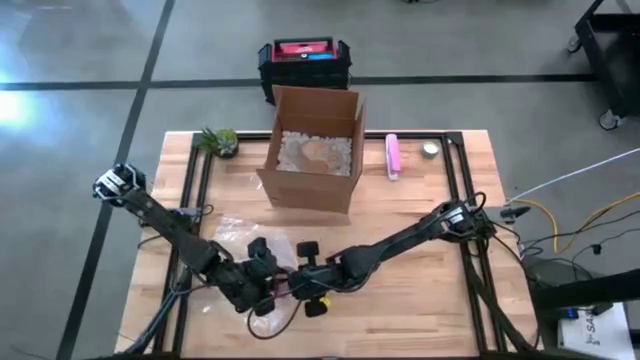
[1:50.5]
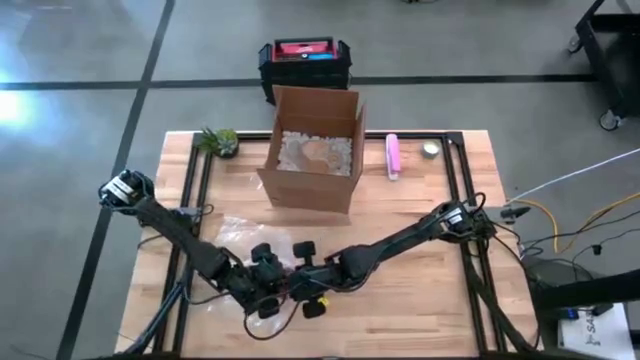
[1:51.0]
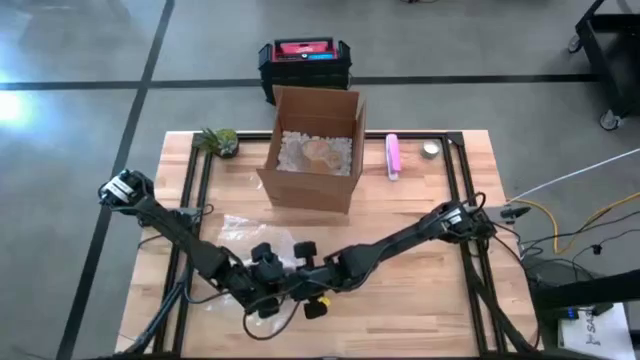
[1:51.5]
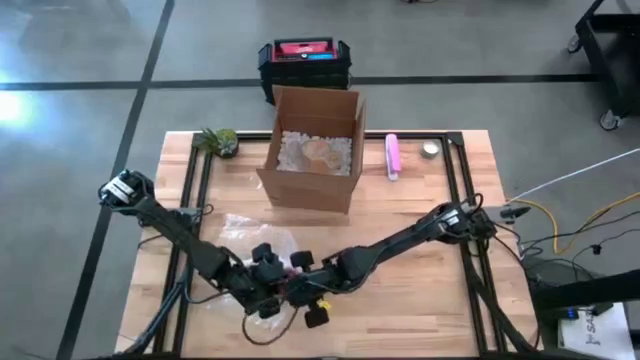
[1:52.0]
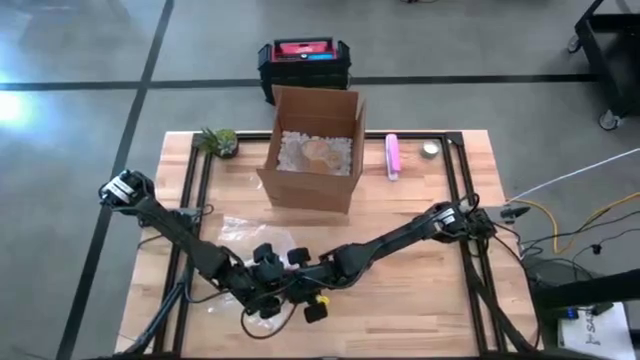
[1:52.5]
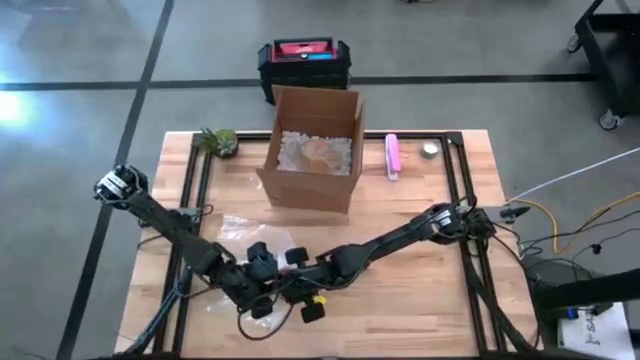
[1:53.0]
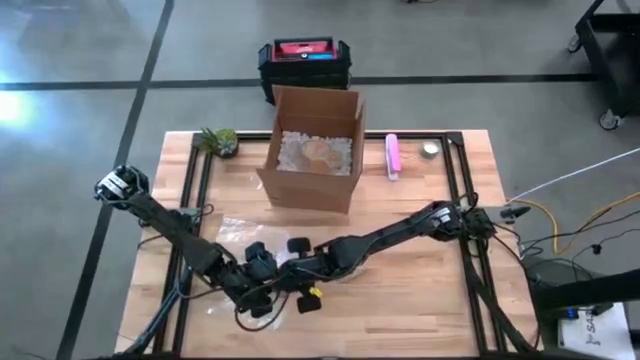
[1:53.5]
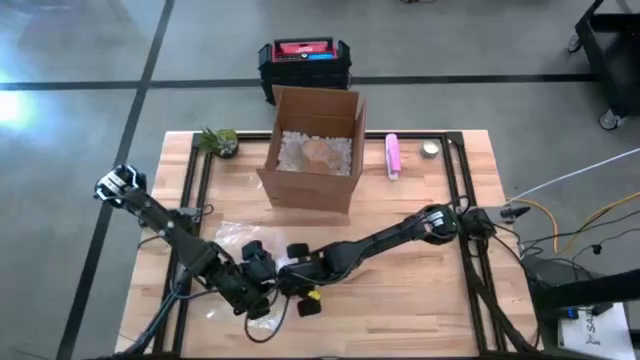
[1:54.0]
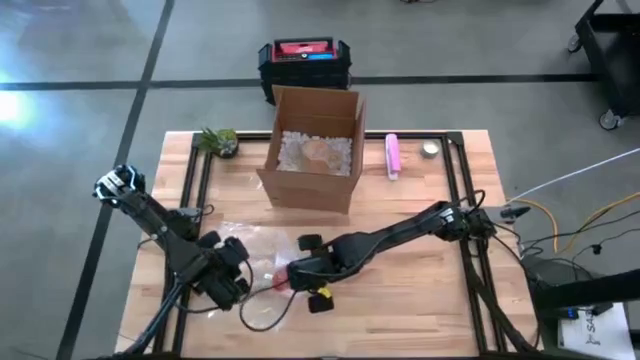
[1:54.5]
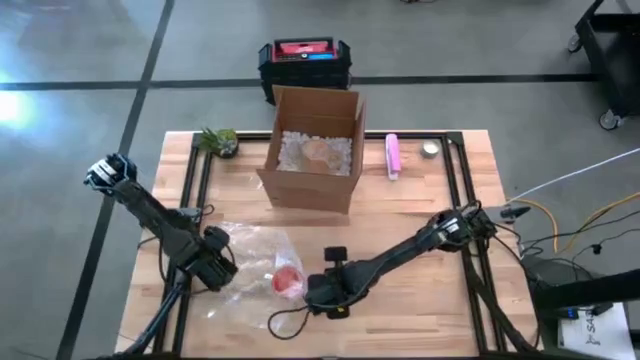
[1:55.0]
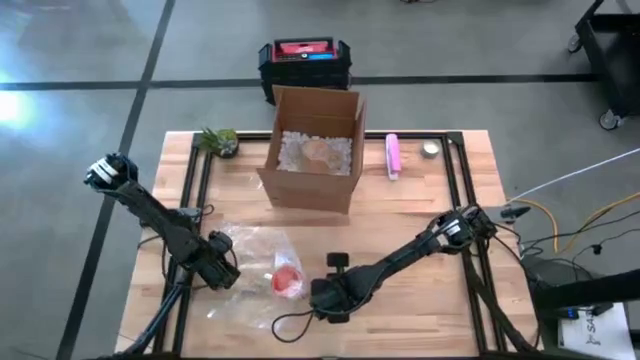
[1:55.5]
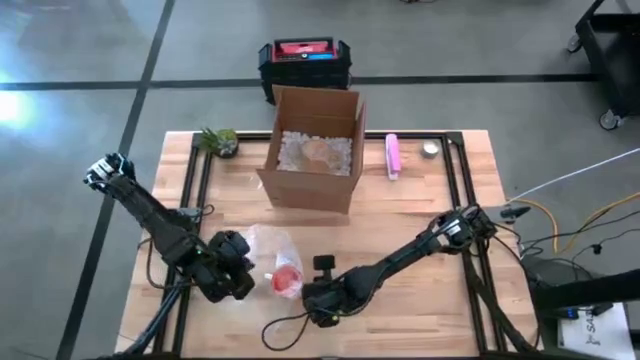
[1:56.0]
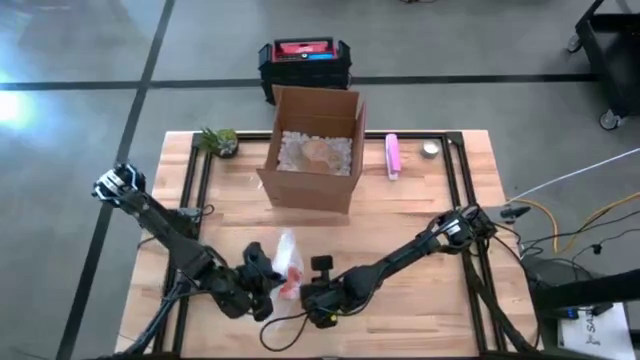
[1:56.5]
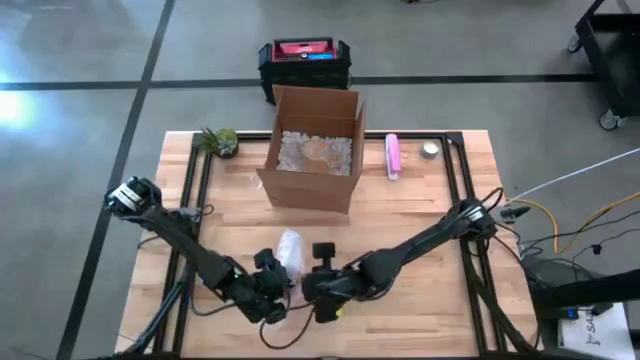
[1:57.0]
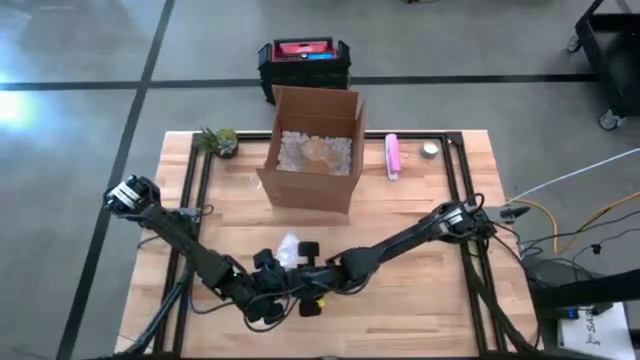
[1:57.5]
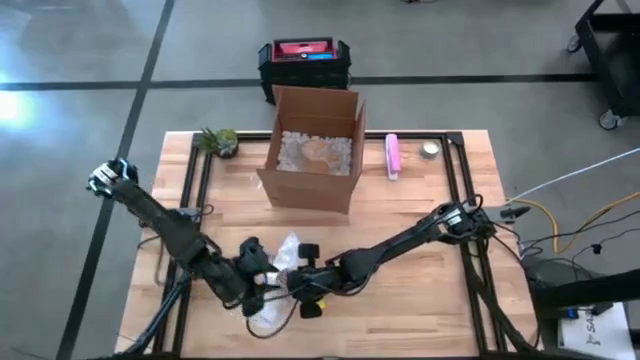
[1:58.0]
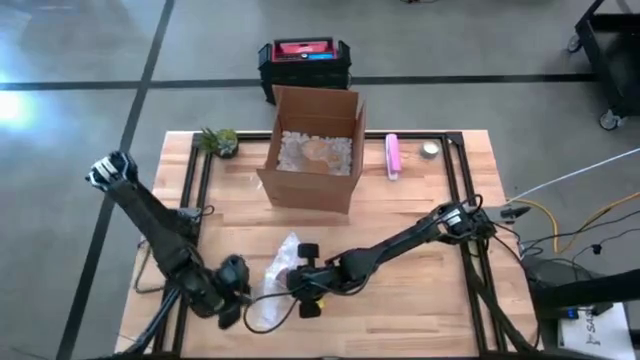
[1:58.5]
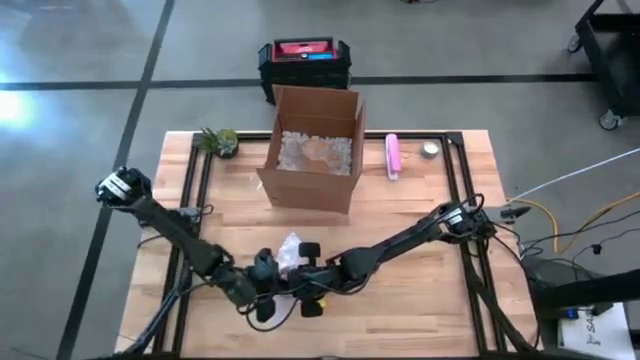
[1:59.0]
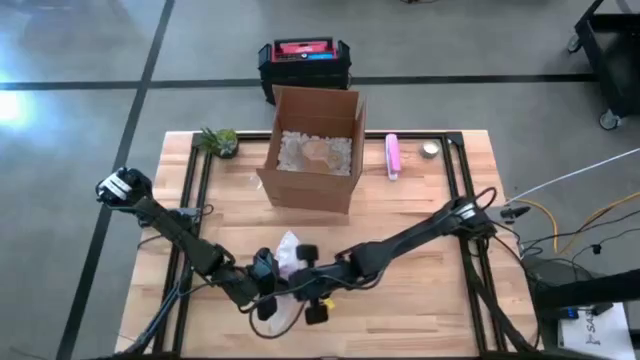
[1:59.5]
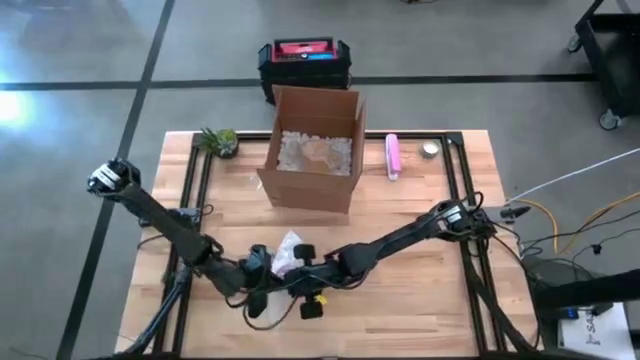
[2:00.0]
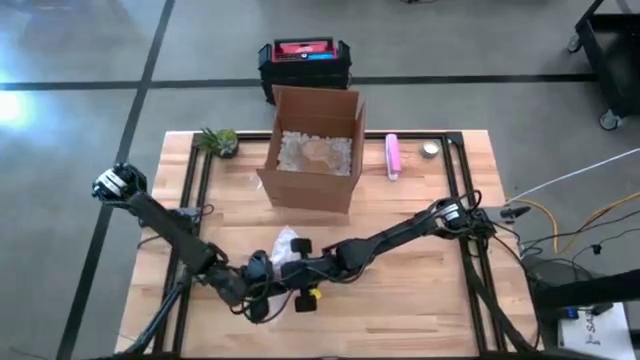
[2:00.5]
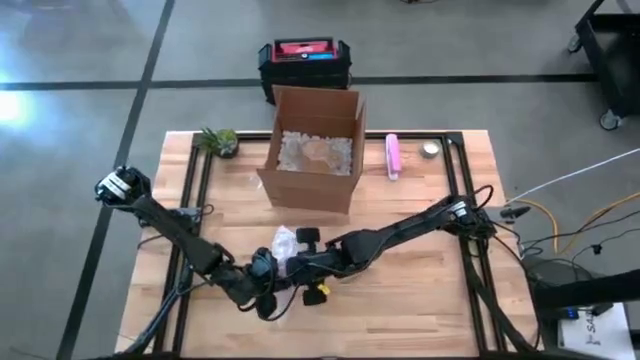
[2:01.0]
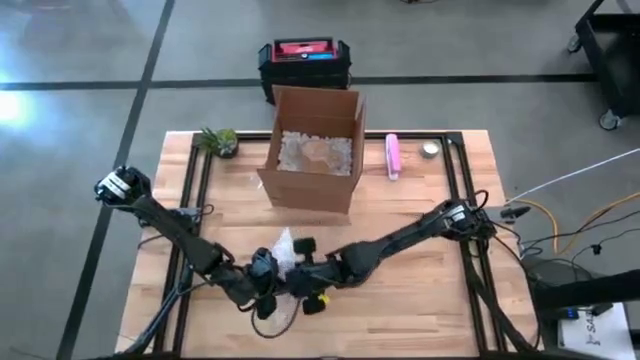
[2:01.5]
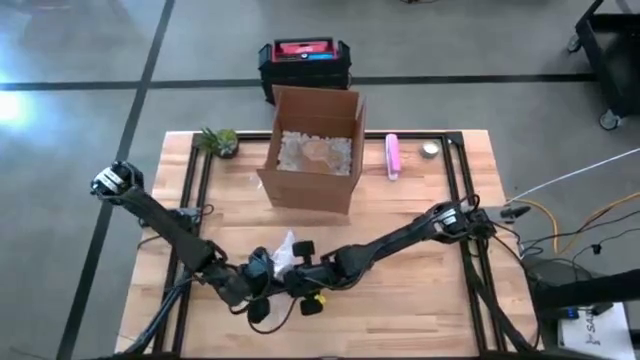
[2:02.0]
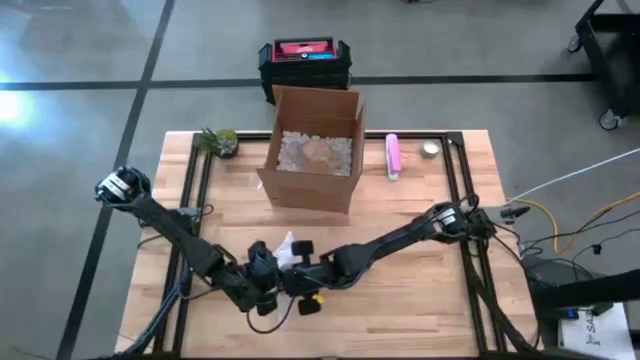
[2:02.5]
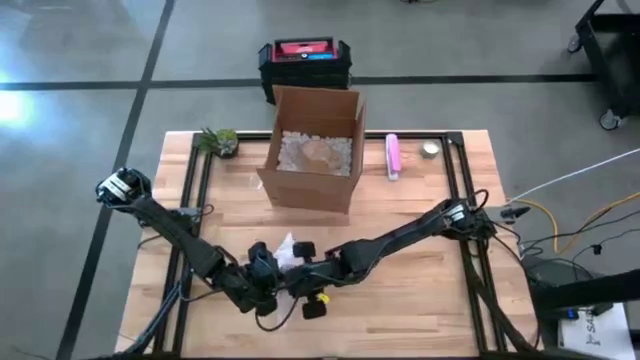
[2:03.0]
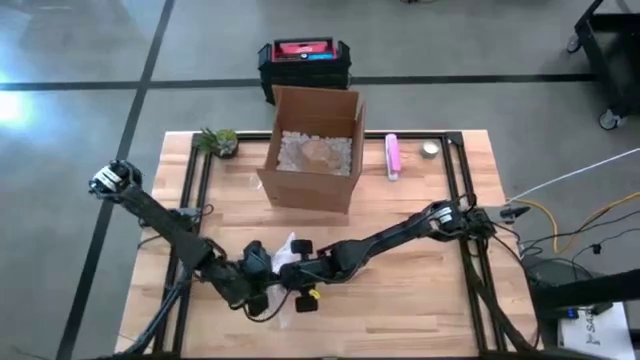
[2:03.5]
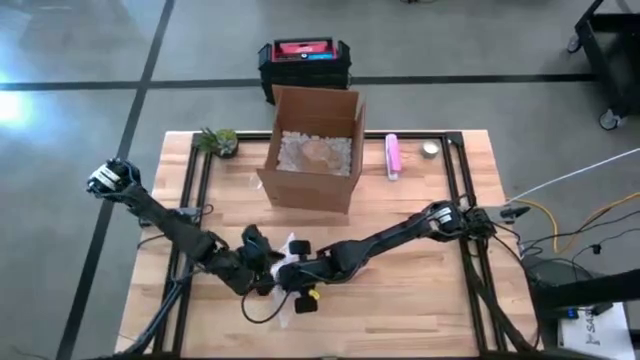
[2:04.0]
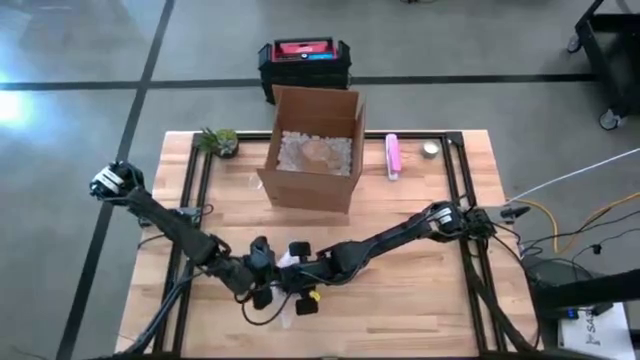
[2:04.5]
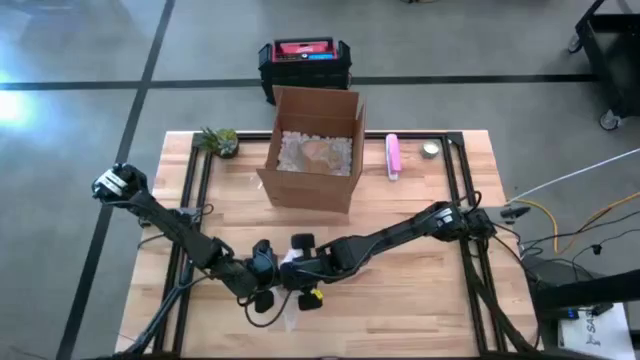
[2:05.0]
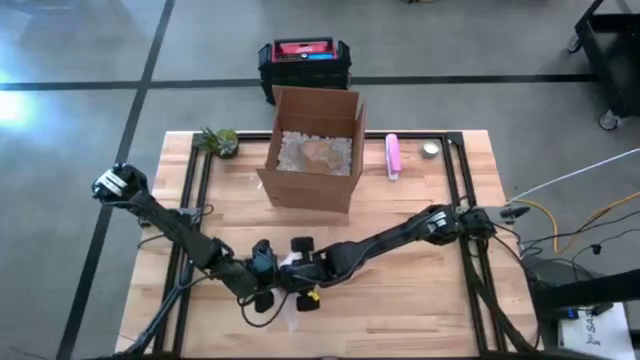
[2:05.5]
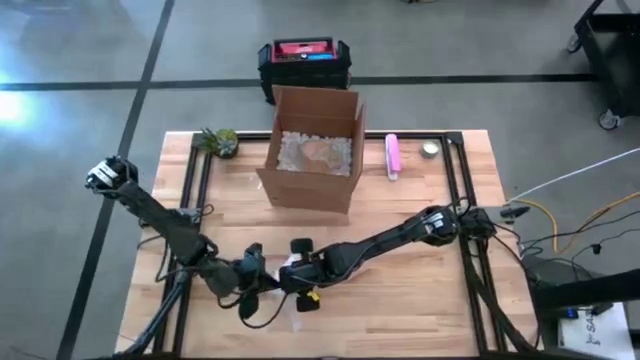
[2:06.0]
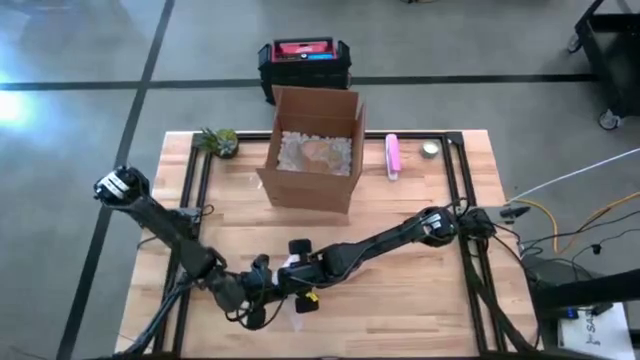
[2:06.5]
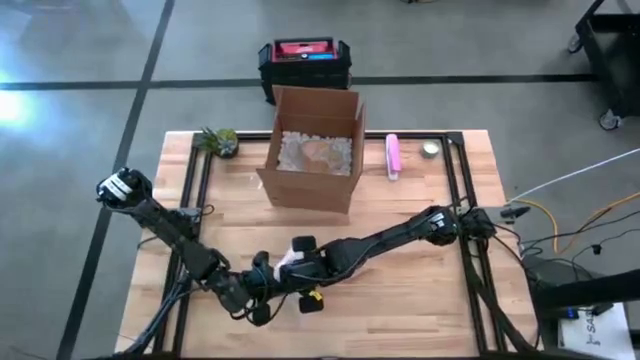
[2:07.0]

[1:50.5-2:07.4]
Task: wrap mug
Wrap the orange mug with transparent bubble wrap

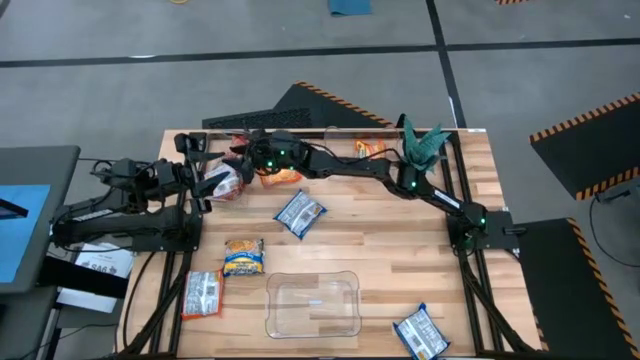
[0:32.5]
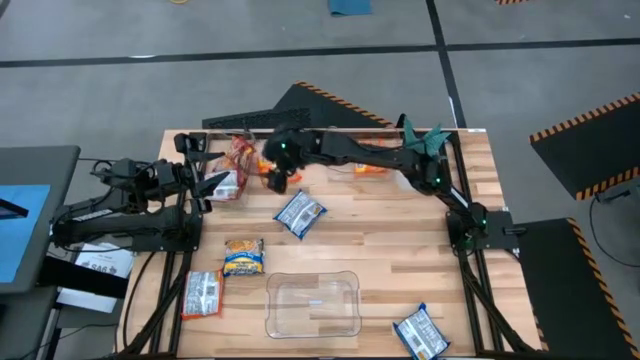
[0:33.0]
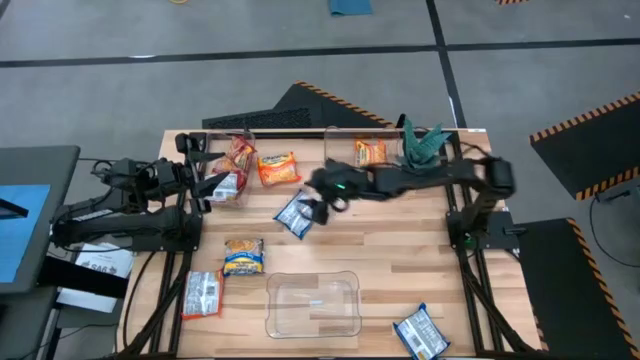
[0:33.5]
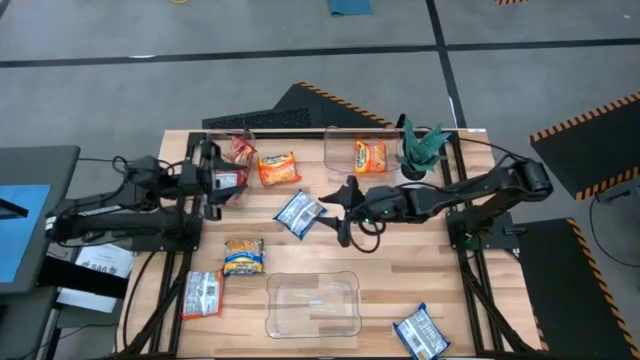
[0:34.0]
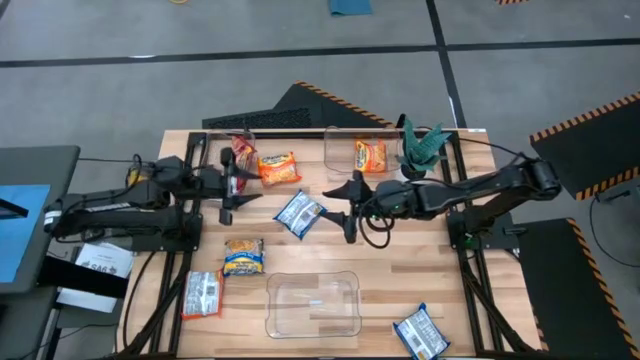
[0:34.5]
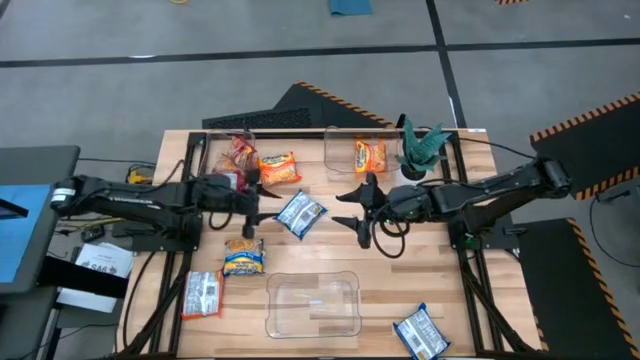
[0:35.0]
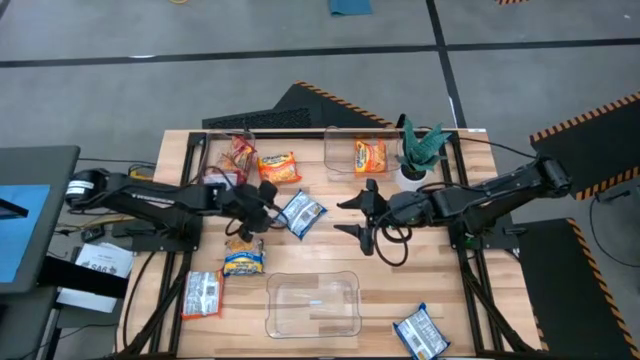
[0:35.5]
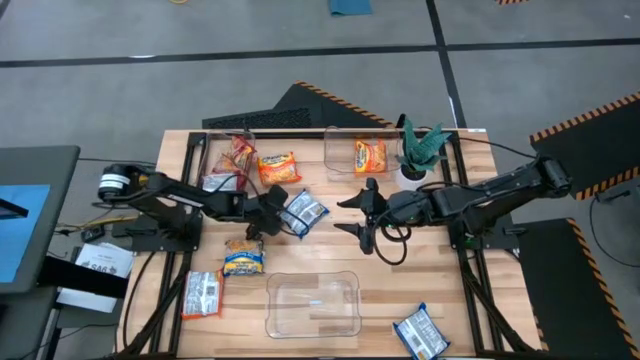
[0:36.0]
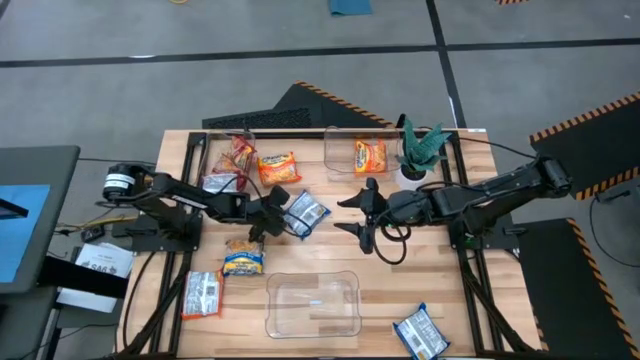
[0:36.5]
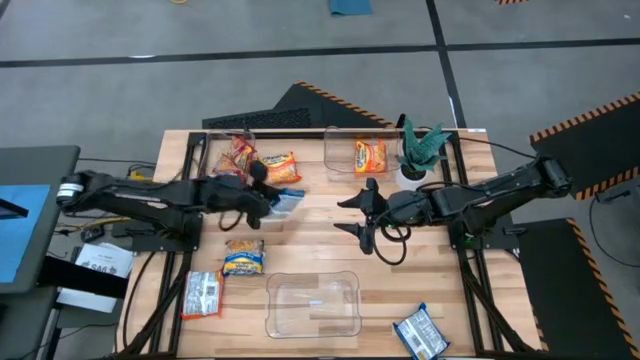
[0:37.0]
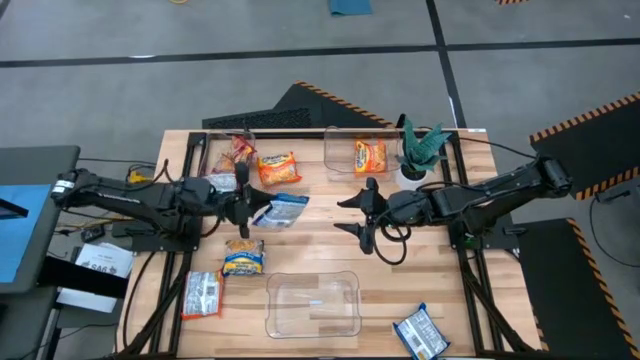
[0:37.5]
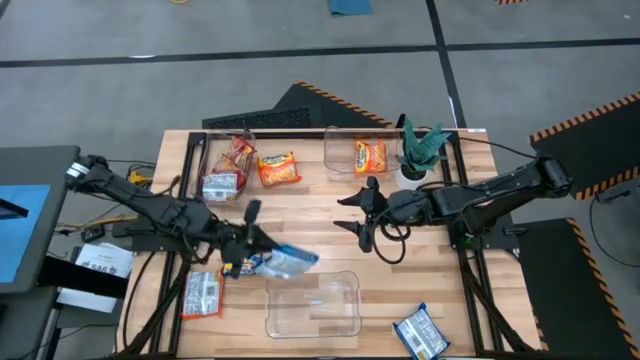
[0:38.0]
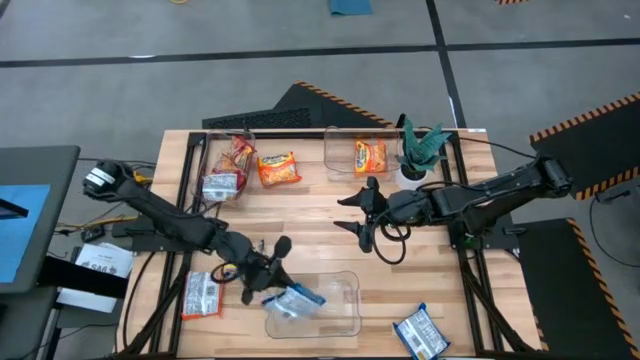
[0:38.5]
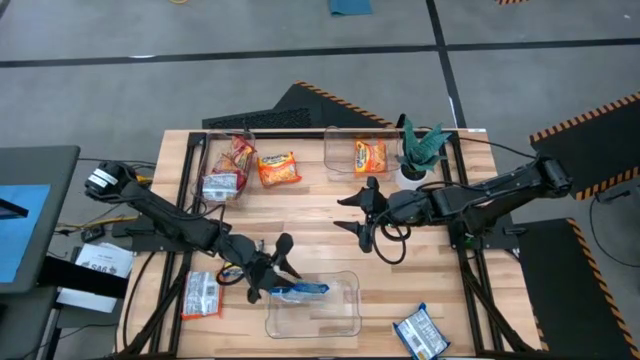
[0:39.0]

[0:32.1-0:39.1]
Task: Sort Maruchan noodles
Put the top blue noodle pack into the bottom transparent bin
